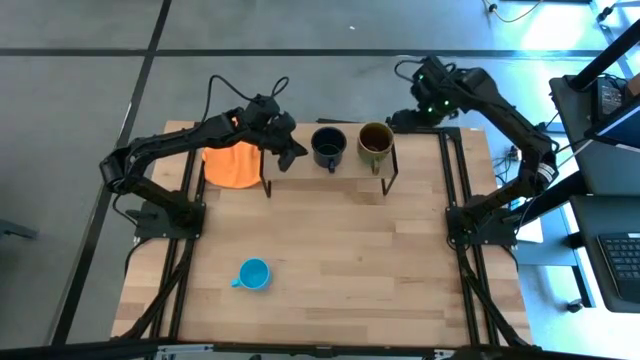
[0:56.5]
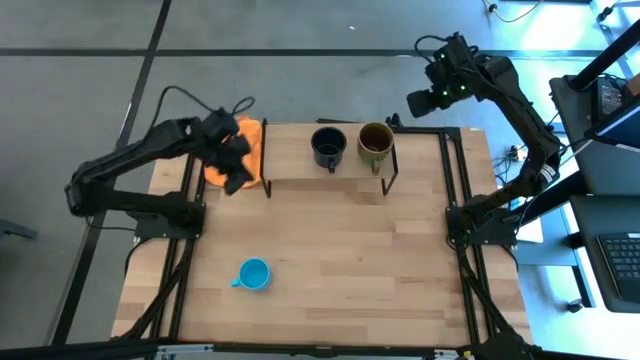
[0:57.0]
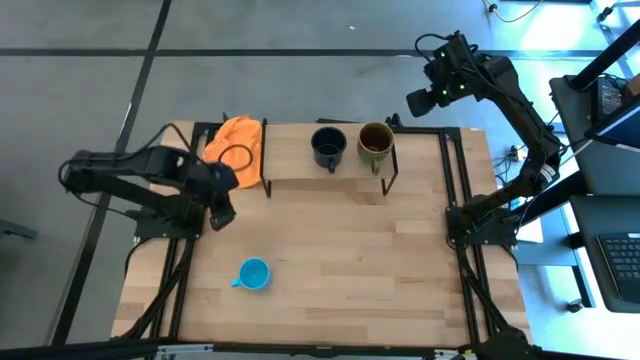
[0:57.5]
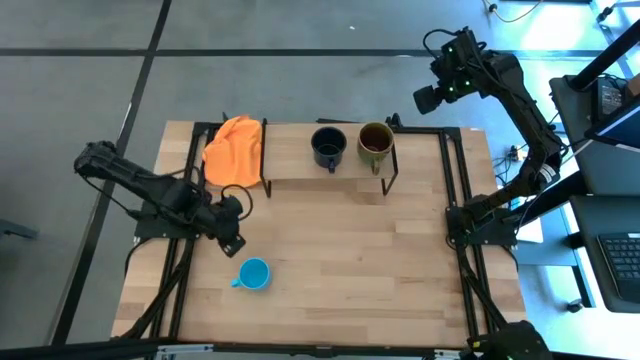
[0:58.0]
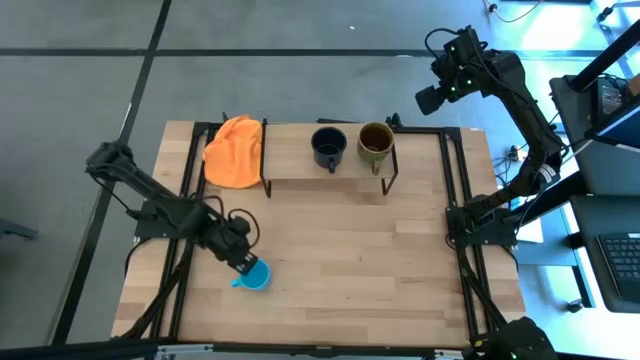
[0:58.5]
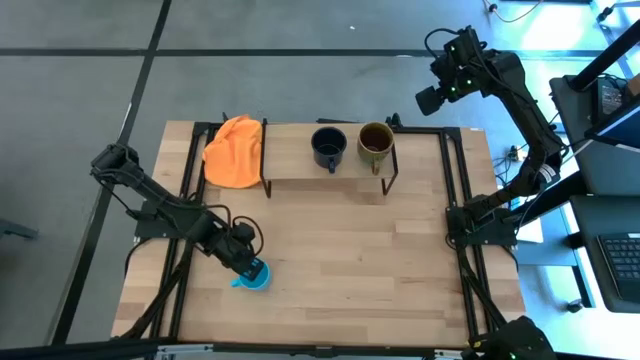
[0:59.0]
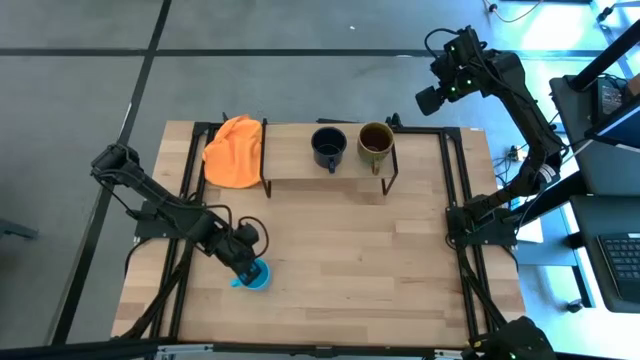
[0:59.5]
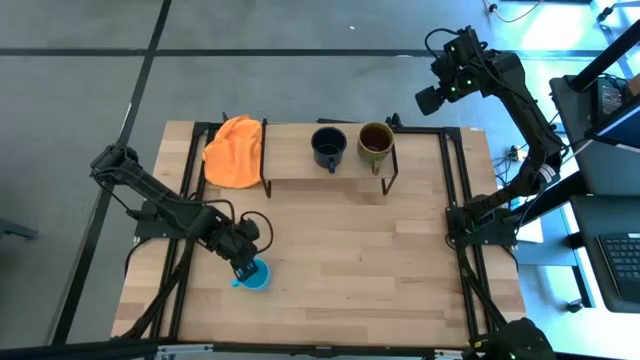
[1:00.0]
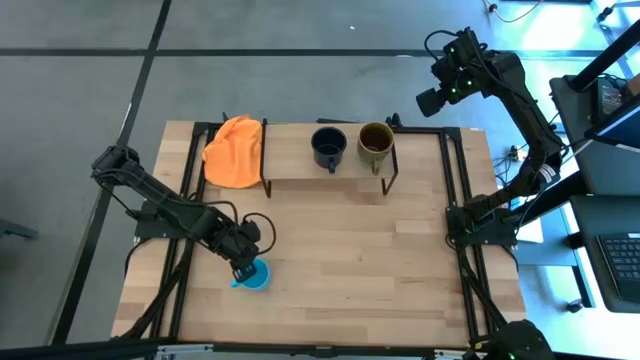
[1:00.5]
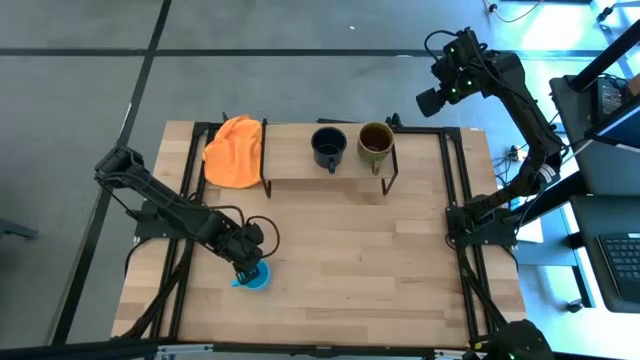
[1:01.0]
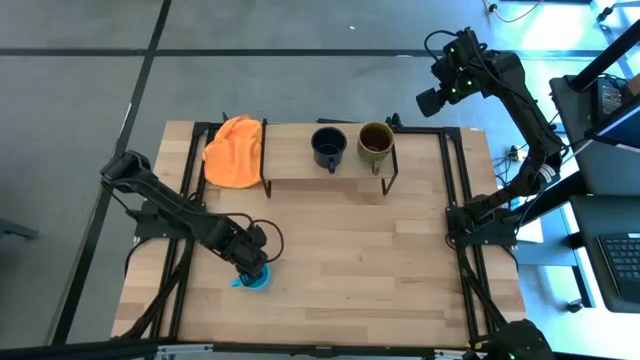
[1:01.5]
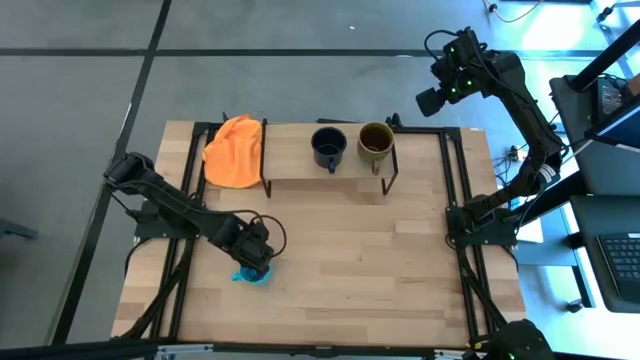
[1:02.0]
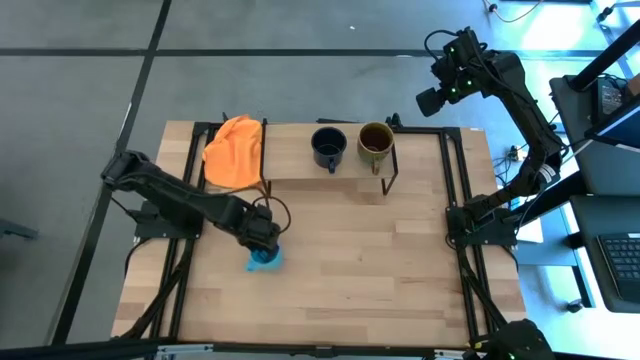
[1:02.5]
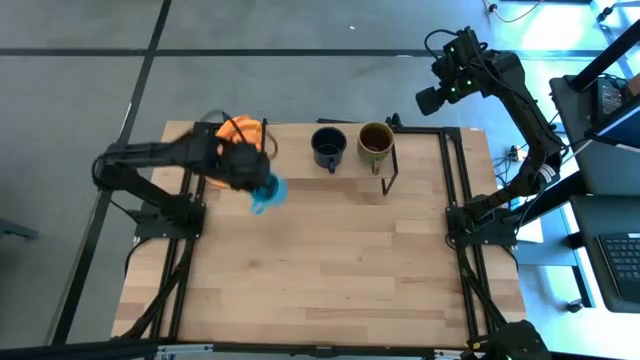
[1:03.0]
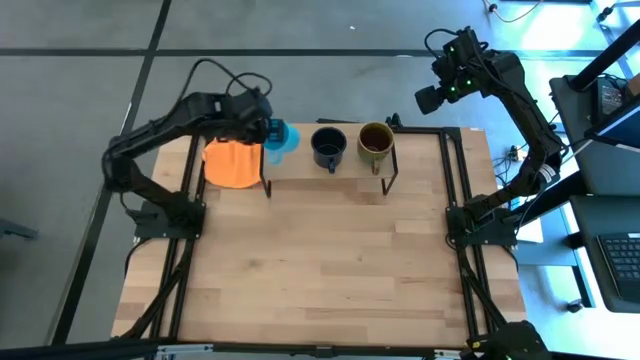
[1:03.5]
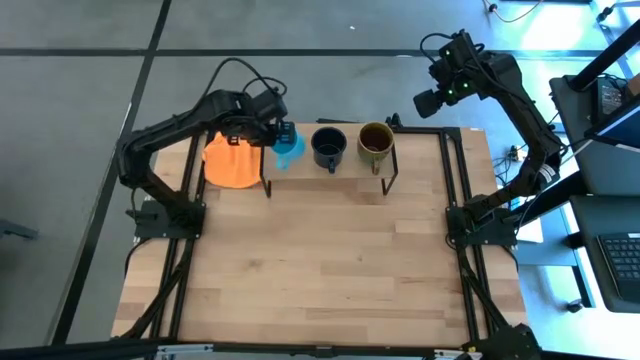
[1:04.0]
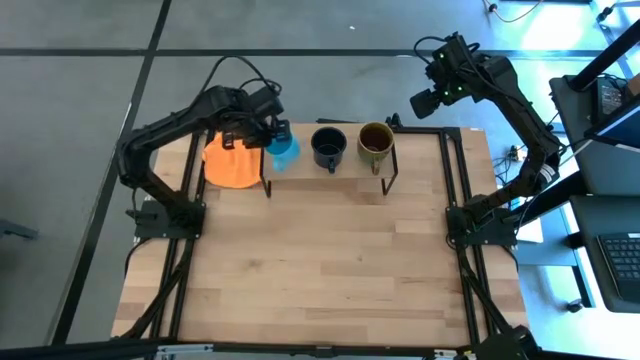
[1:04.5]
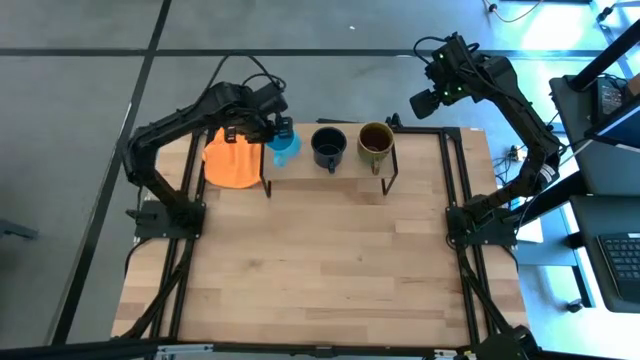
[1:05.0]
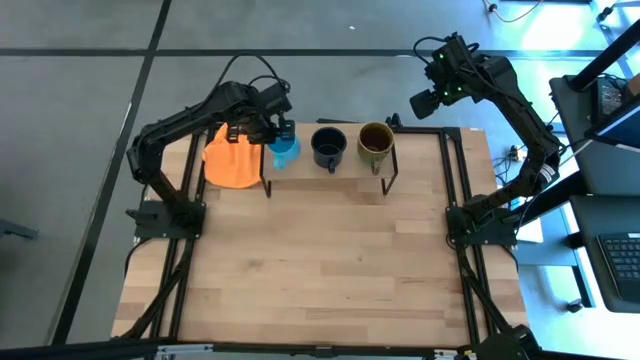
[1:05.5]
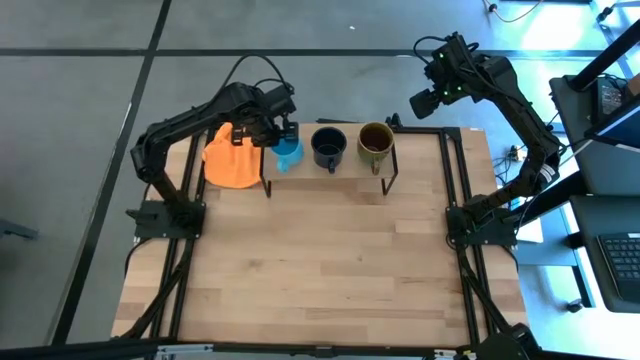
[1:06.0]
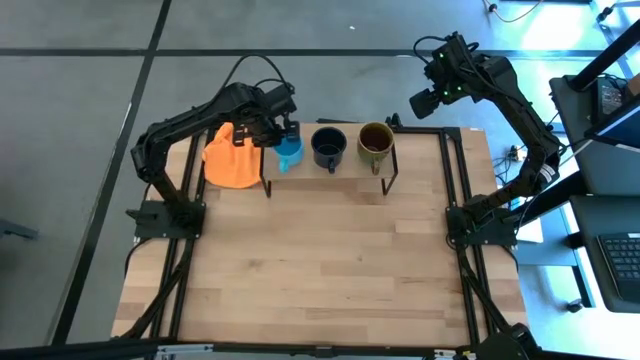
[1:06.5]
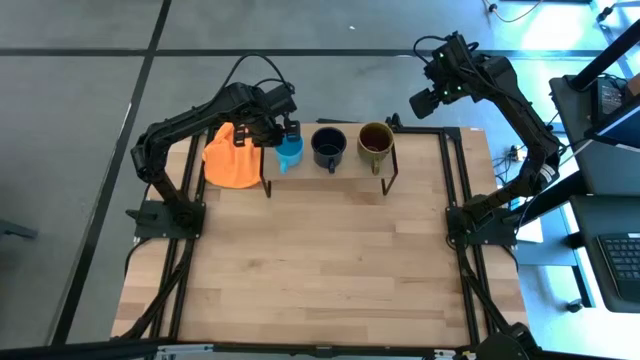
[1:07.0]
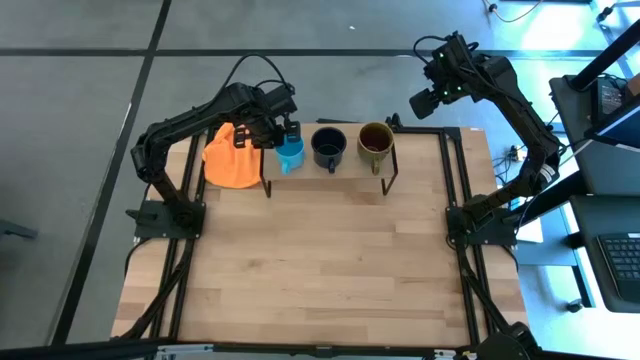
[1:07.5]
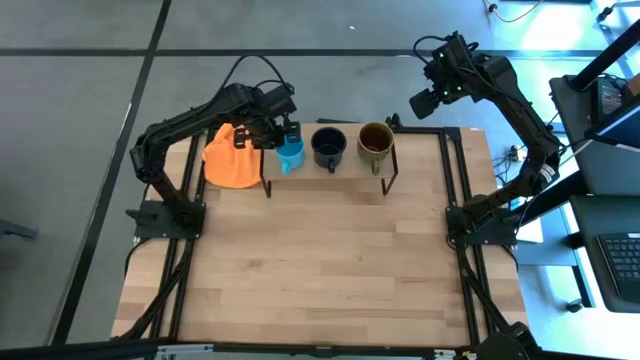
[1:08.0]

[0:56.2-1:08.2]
Task: Stack small to large cups/mugs on shelf
Put the blue mug on the shelf

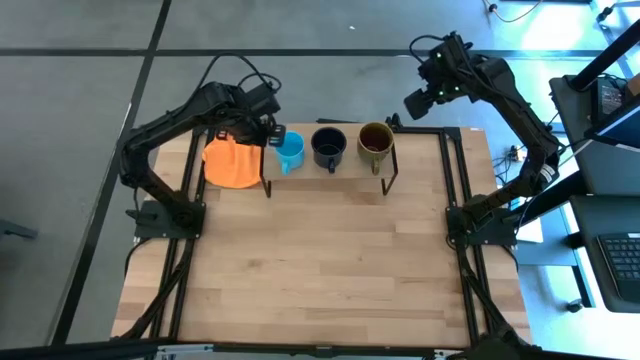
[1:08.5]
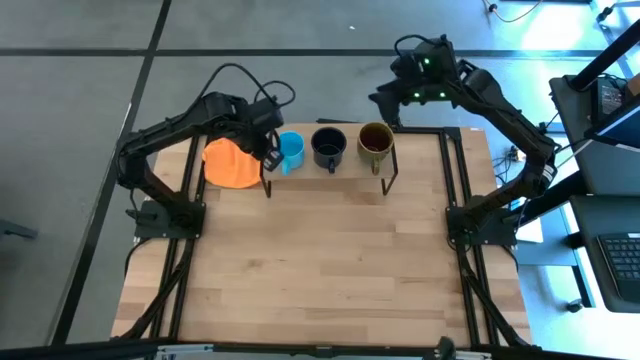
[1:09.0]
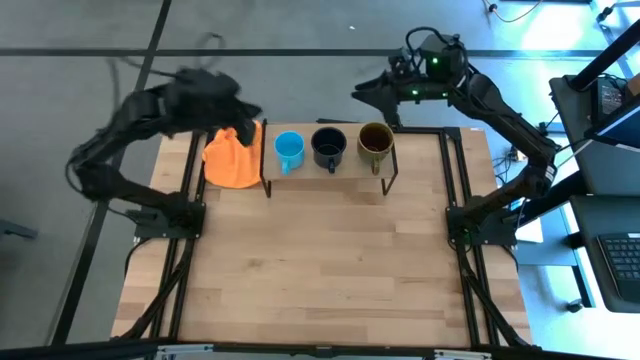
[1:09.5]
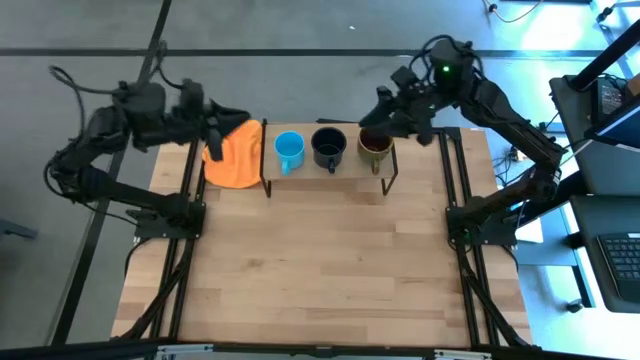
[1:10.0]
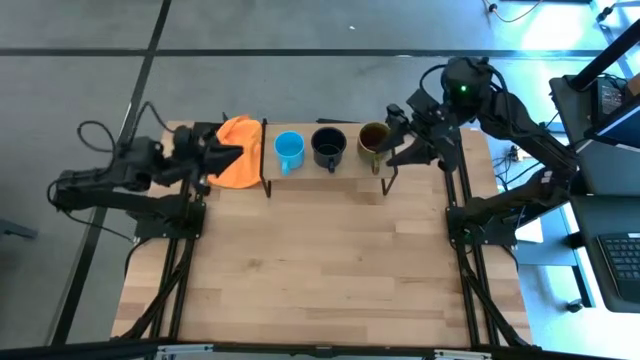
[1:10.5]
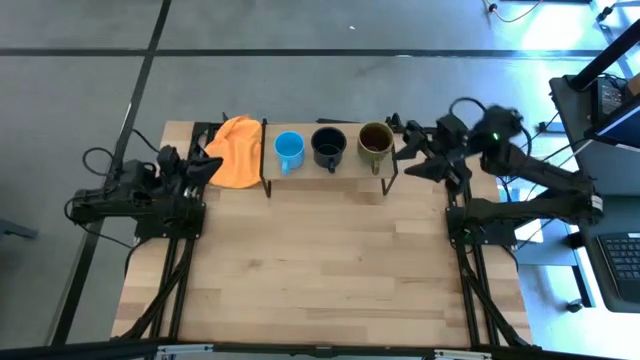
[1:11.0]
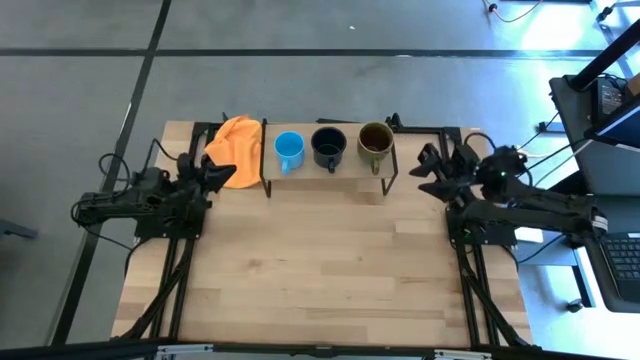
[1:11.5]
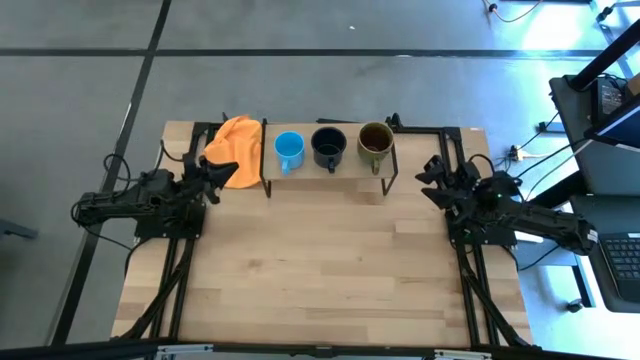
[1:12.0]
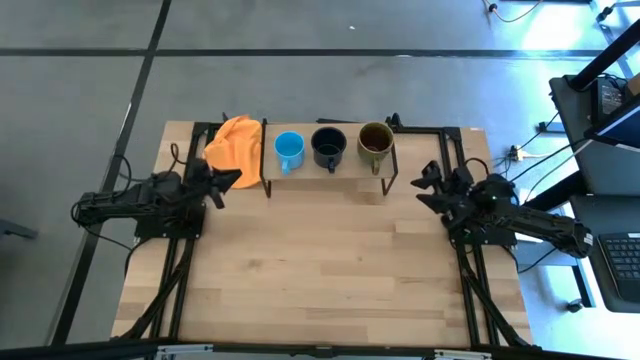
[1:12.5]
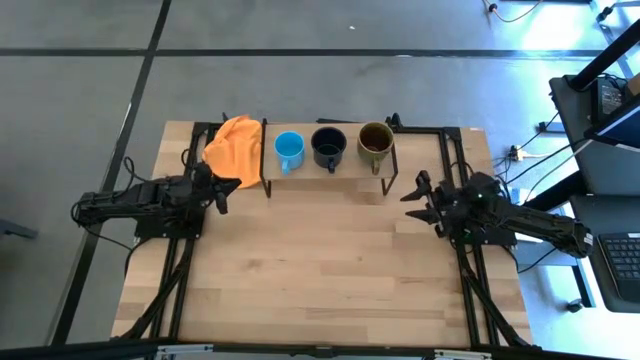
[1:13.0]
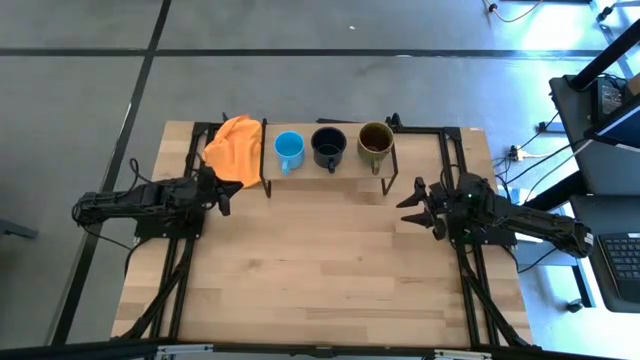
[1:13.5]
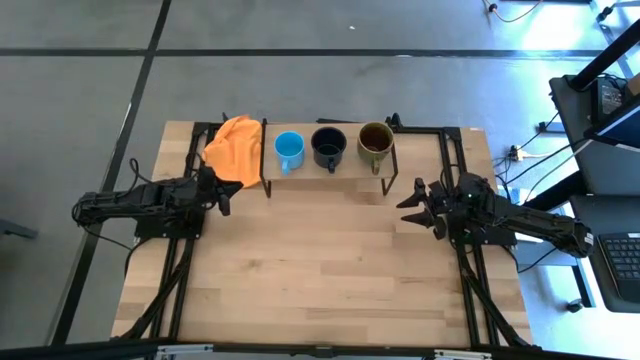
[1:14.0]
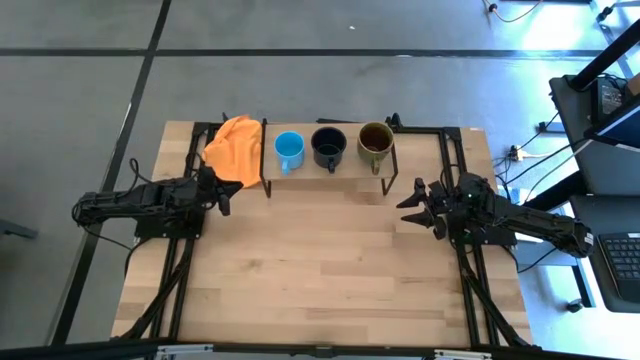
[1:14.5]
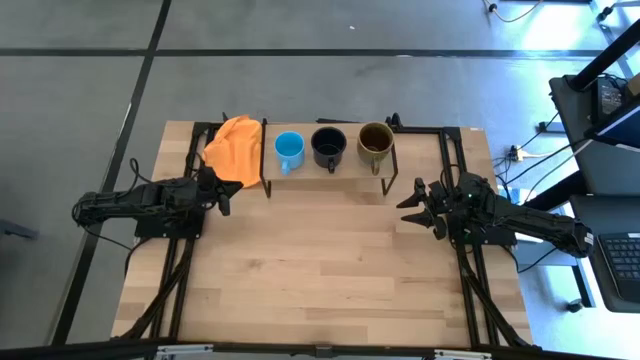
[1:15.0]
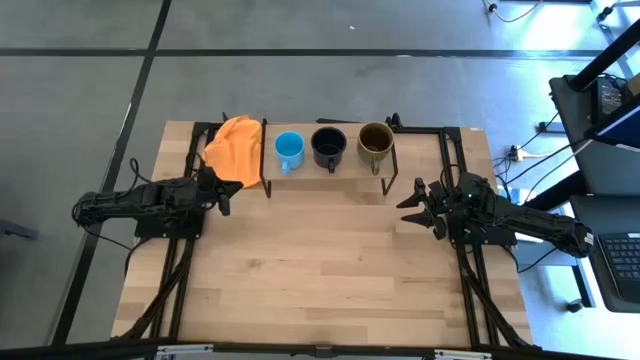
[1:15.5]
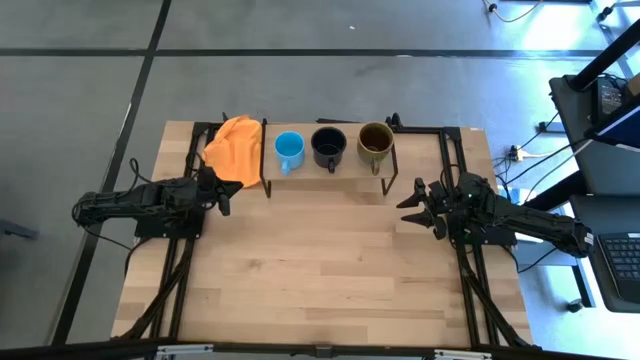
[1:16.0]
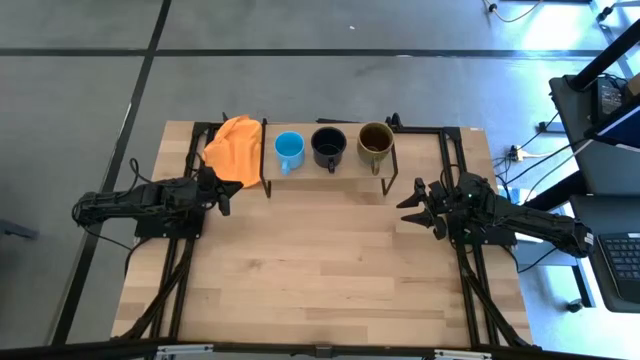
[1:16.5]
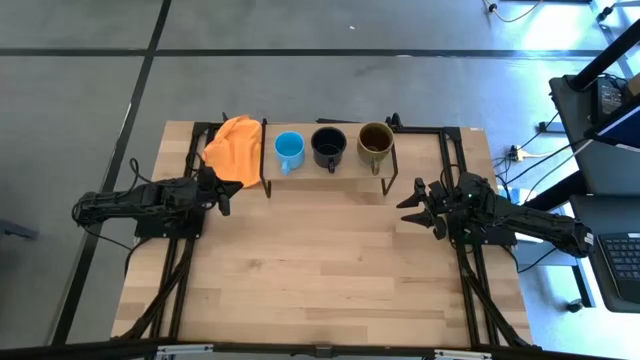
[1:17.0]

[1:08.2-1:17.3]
Return to Home Position
